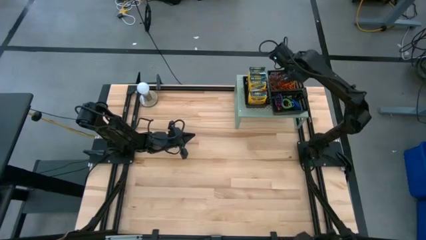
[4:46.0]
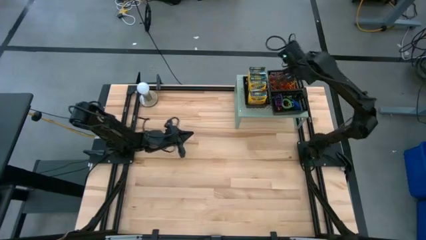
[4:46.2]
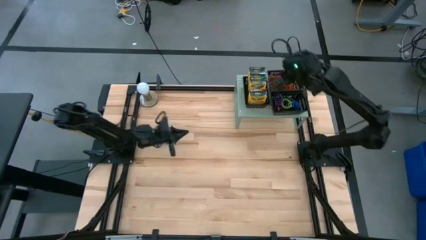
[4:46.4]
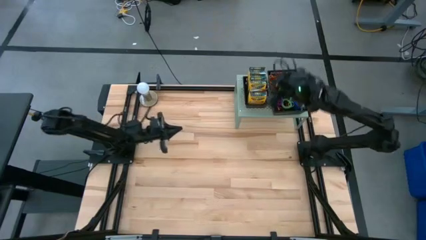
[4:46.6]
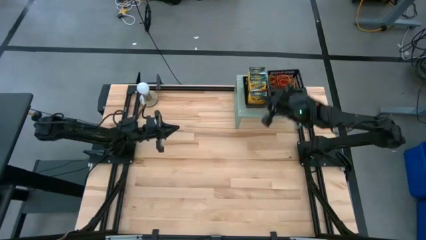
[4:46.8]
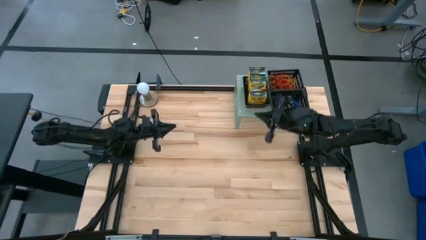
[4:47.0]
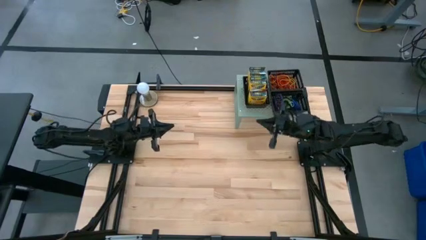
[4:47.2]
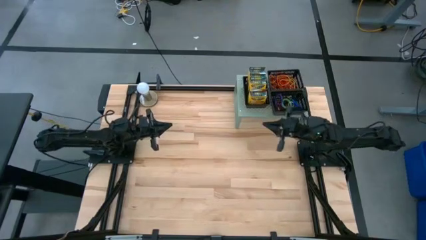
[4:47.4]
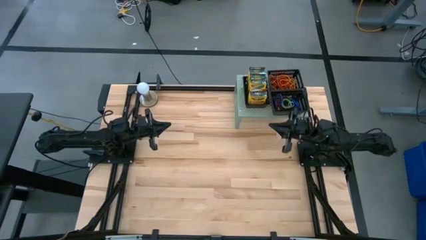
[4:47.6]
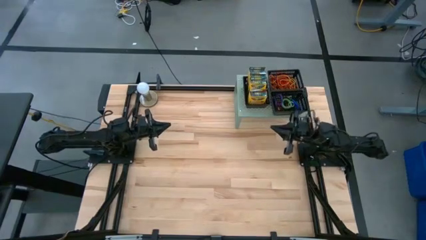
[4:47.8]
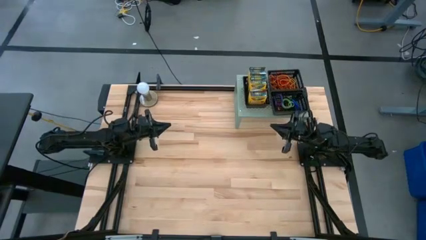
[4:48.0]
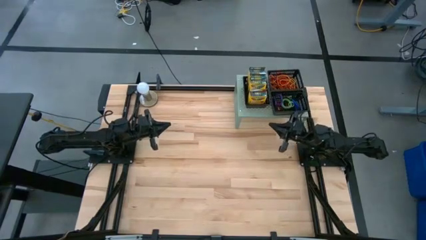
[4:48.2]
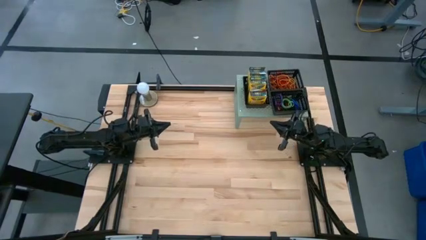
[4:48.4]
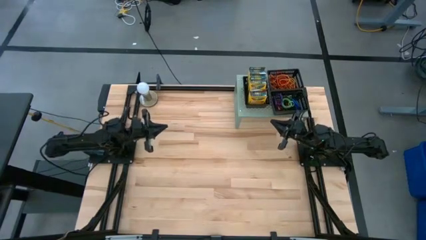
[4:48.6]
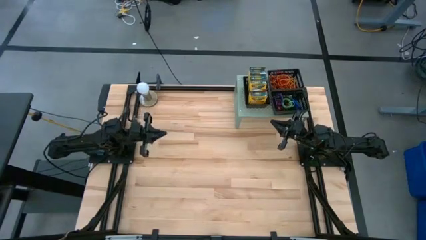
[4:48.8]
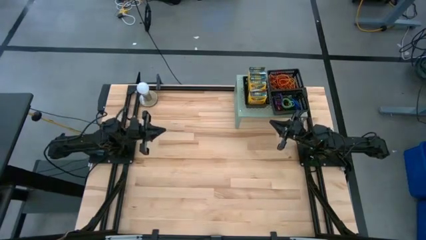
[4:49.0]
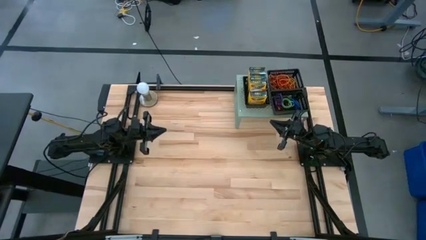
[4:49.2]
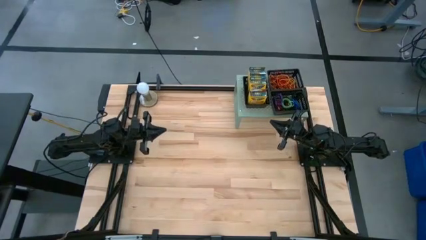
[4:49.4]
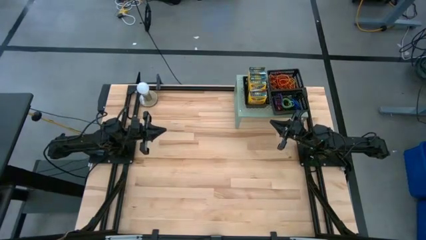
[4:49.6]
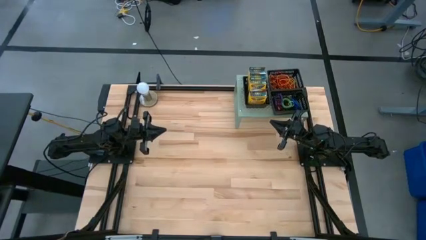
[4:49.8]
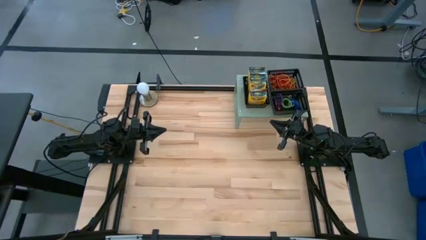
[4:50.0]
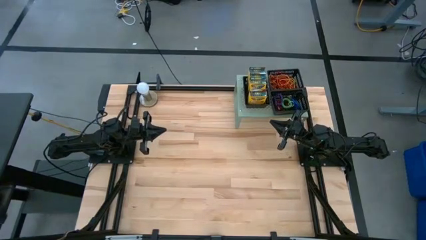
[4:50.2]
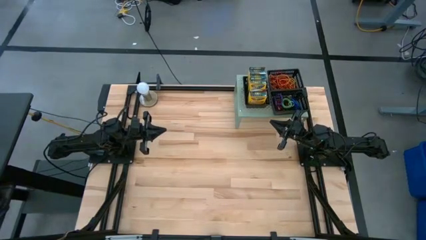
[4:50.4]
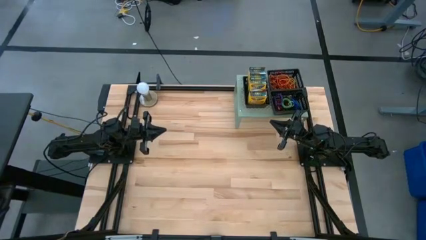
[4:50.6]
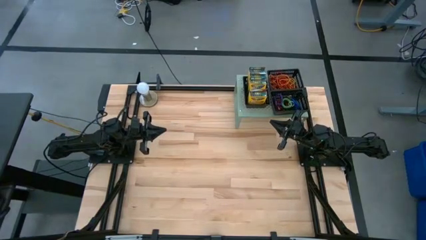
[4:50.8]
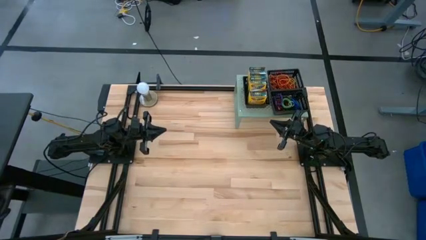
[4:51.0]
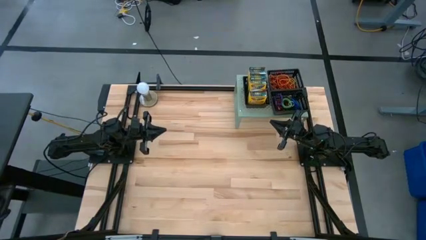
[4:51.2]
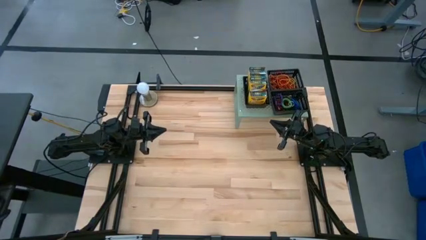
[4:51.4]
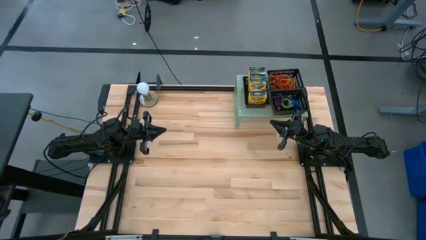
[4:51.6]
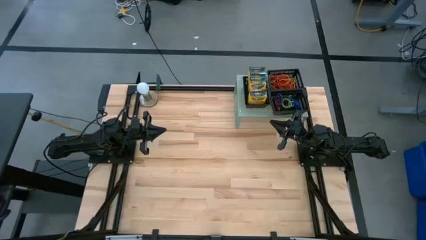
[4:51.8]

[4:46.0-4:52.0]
Task: Pick & Place Office Desk Supplies
Return to Home Position

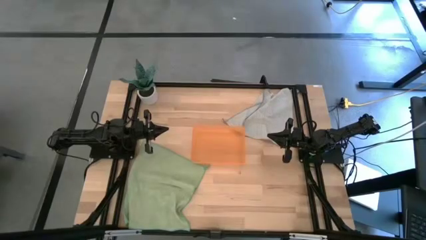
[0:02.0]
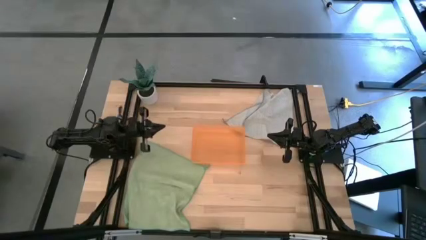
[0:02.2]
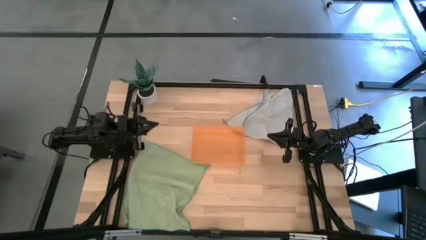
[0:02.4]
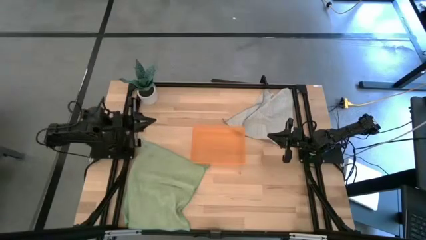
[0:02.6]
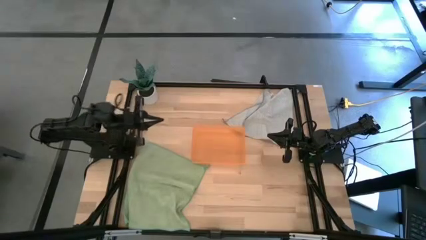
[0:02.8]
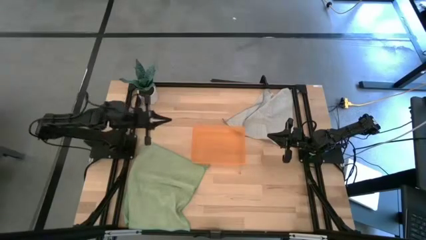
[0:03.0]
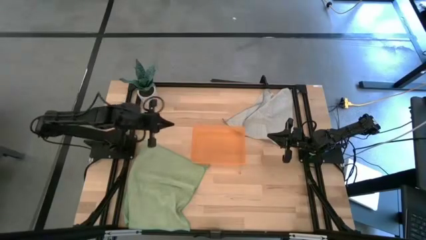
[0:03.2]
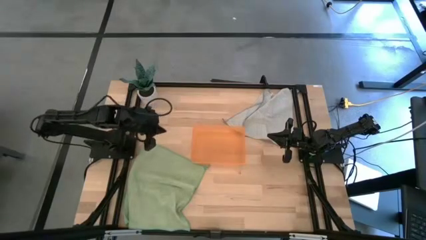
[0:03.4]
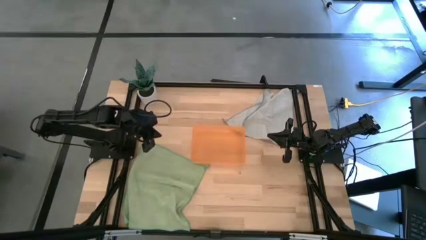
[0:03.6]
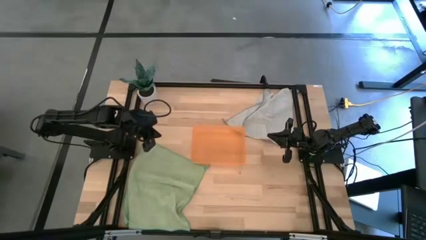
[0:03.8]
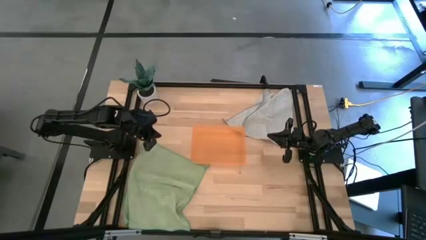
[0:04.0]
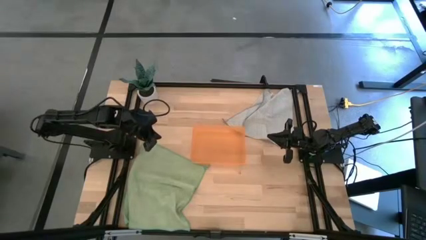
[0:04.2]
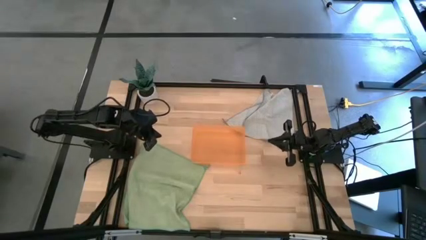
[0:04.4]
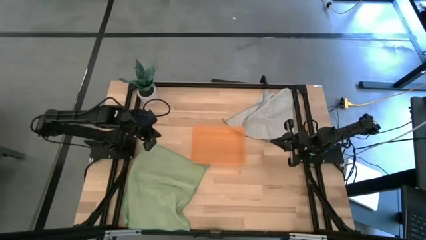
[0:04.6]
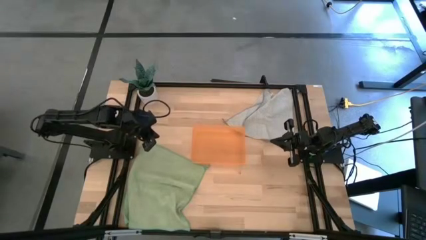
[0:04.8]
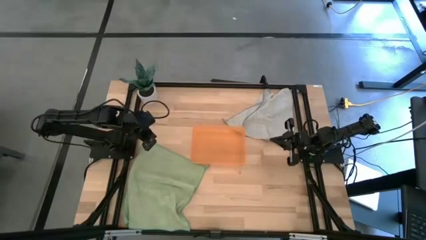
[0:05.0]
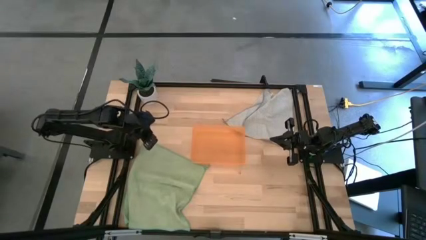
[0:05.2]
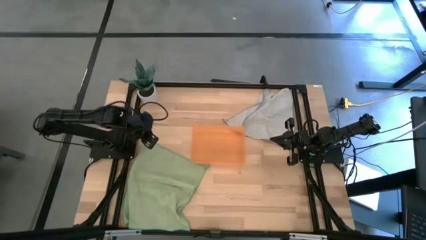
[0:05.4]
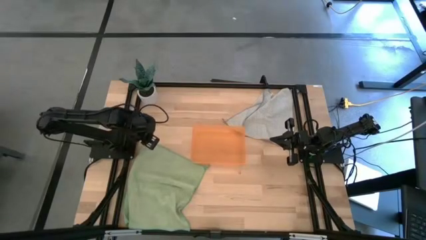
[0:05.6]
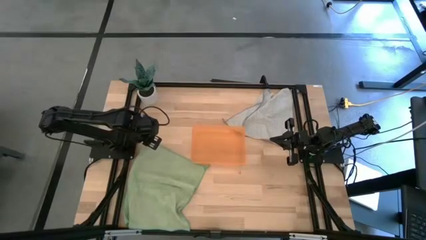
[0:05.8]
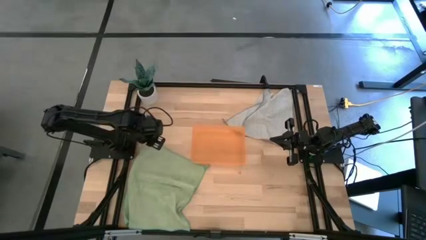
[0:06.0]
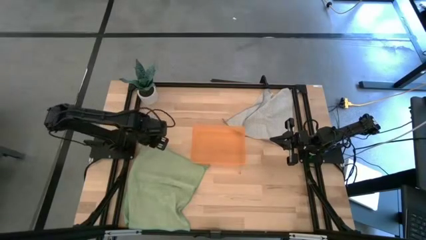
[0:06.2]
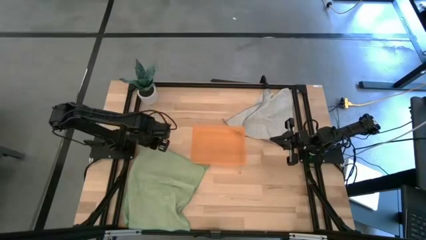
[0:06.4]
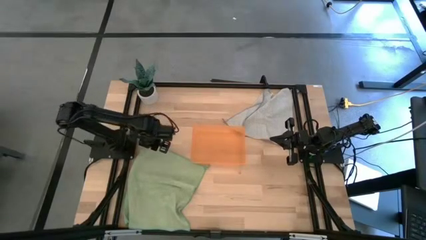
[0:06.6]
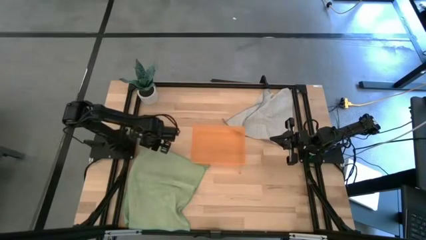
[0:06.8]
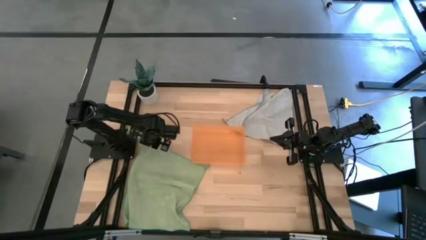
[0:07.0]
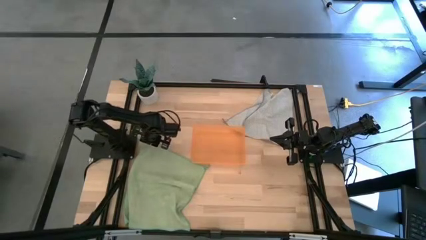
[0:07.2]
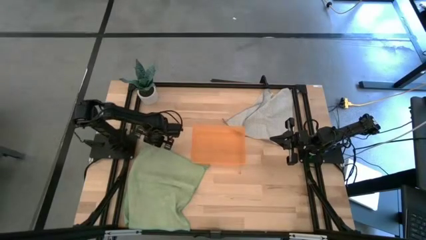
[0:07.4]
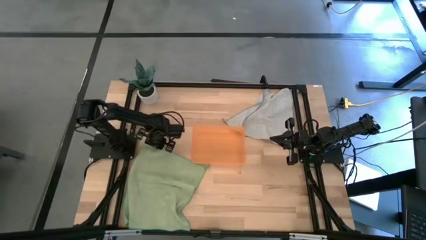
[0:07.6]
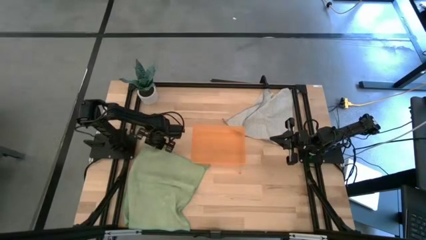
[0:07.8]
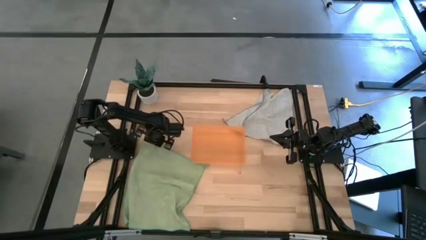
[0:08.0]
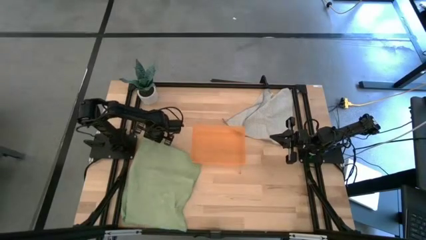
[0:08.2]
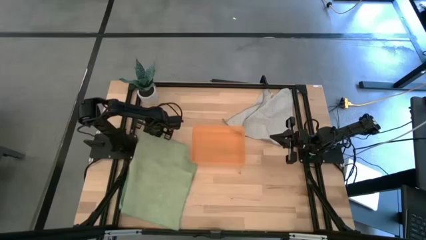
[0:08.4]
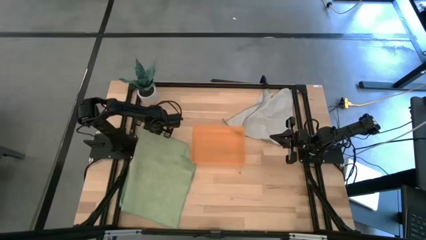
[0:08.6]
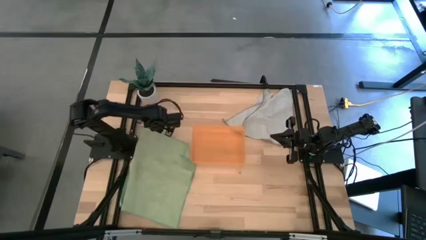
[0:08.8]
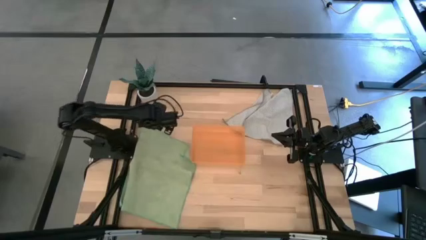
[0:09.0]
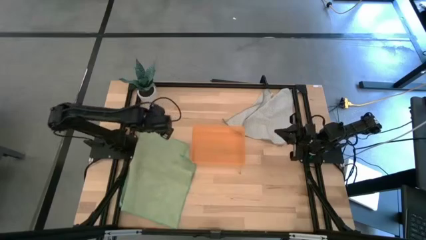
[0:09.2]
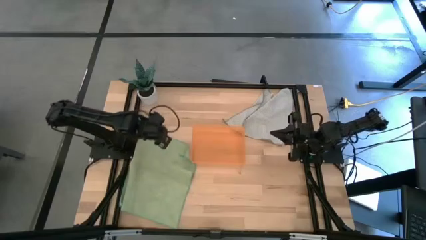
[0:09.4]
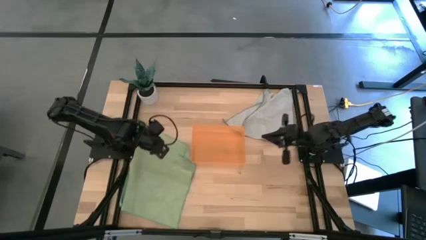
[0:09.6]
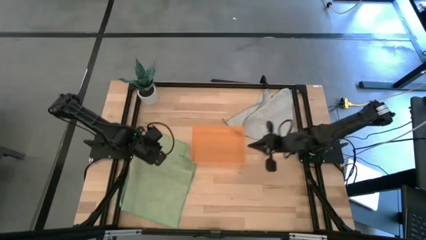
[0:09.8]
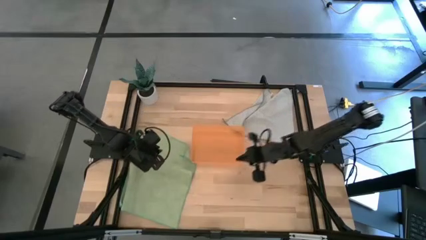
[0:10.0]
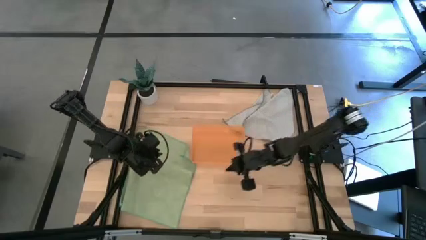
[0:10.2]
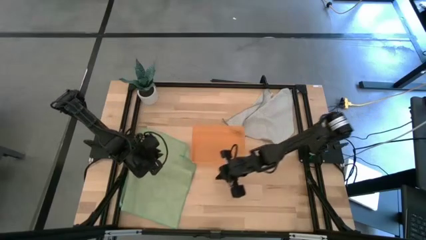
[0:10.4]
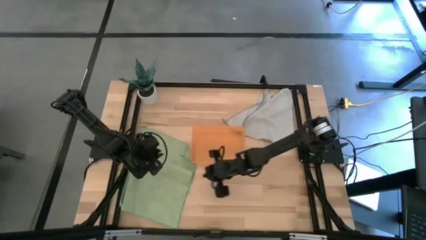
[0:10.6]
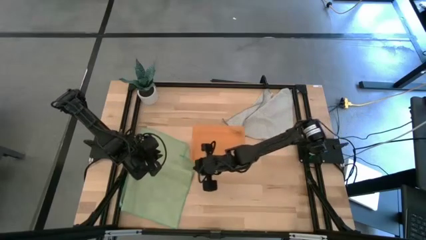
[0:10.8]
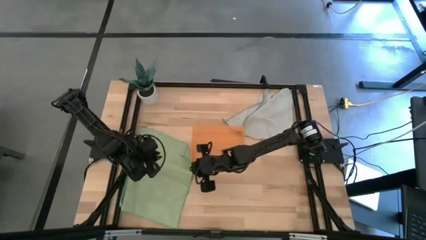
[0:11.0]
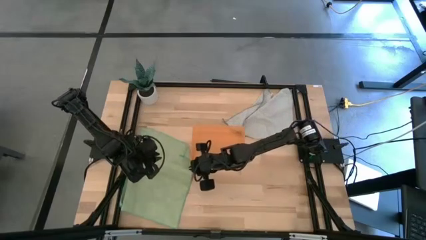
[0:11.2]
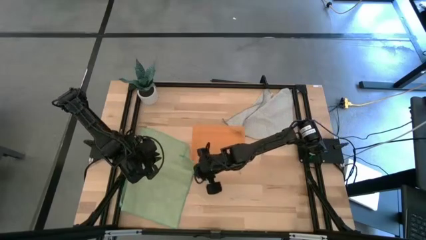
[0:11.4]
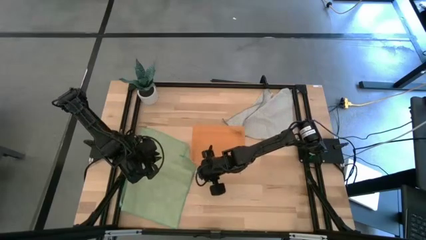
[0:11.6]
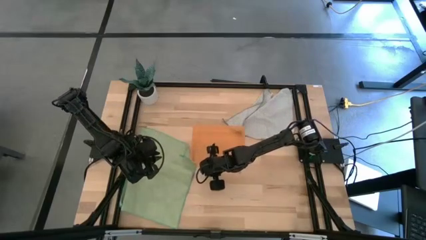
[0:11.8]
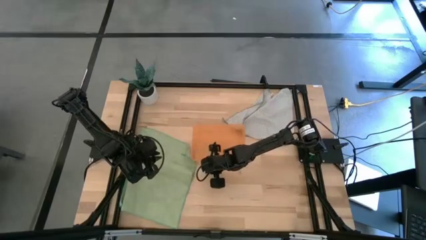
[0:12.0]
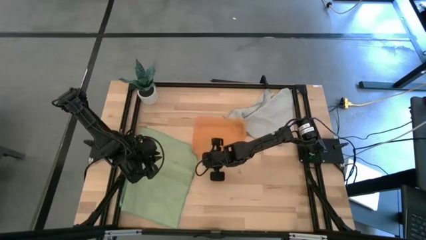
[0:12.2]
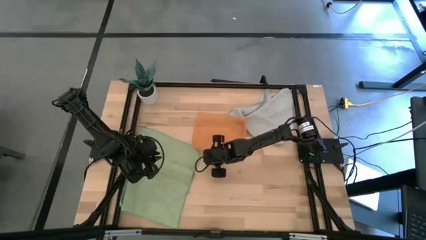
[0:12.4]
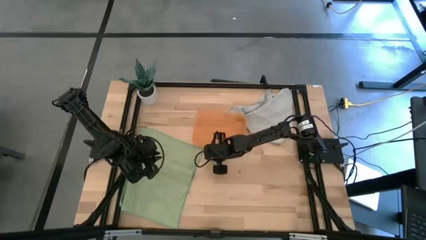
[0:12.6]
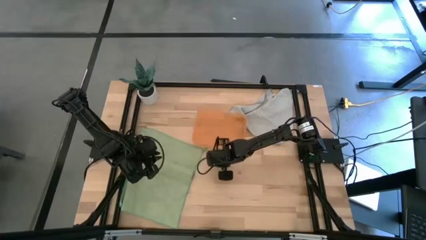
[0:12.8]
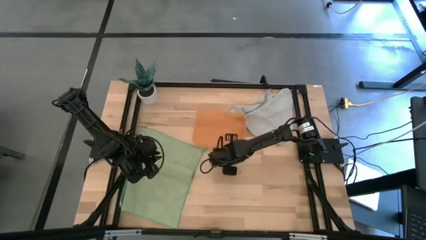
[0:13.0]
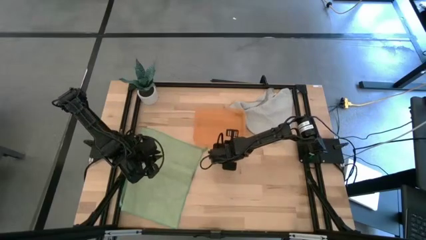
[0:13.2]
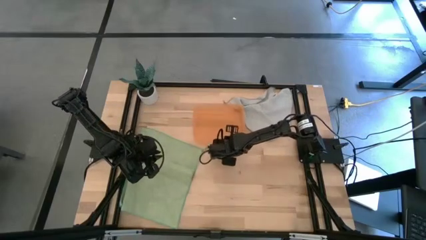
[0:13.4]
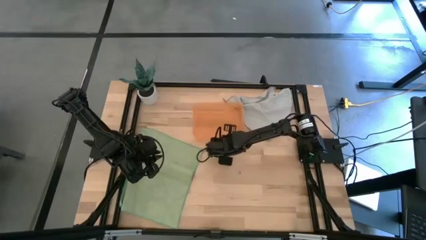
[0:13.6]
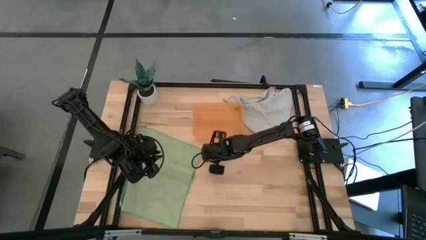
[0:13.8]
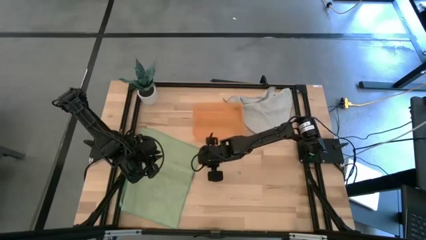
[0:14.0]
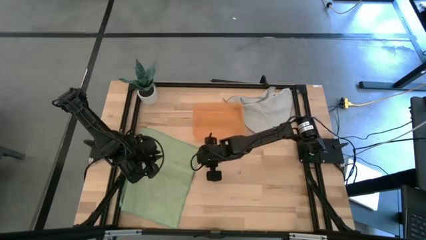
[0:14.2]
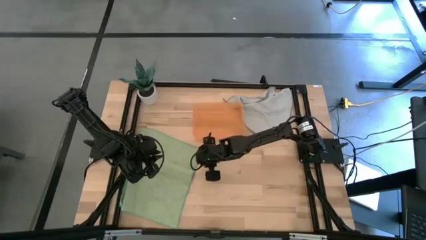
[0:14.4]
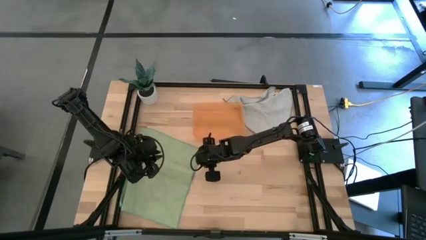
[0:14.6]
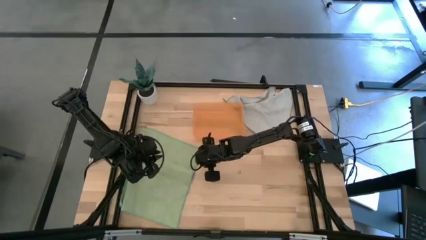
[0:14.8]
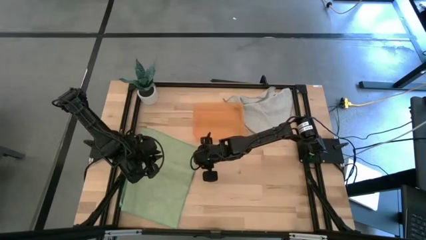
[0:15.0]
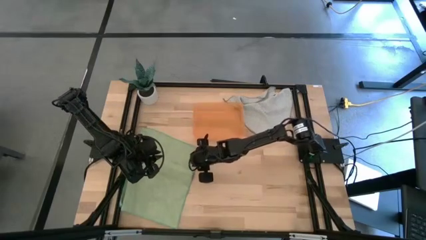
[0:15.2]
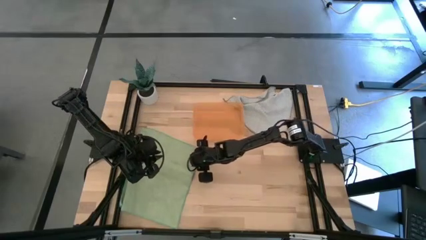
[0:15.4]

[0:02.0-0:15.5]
Task: Roll microfiber towels into tight, uniform cylinder then place into a basket
Fold the green microfiber towel
